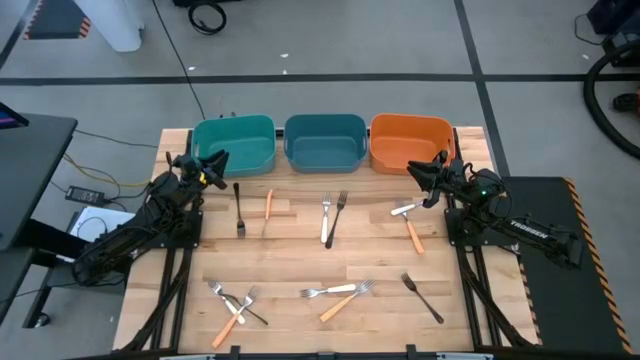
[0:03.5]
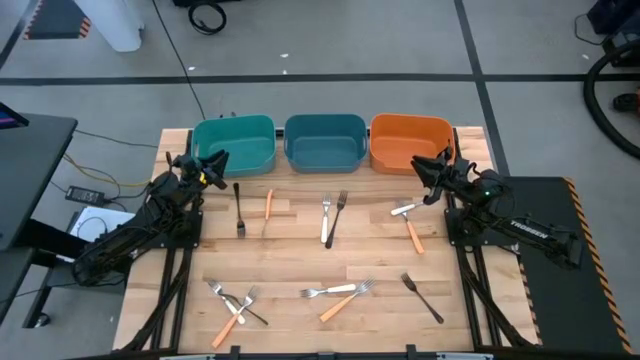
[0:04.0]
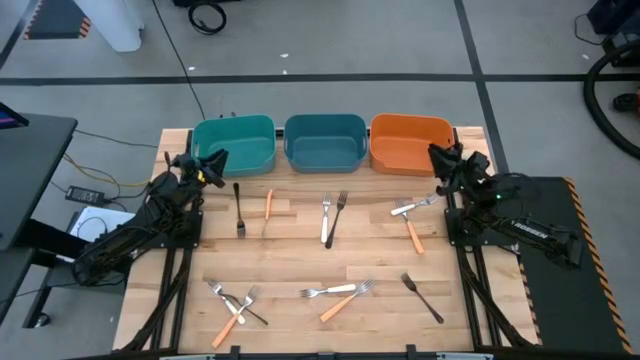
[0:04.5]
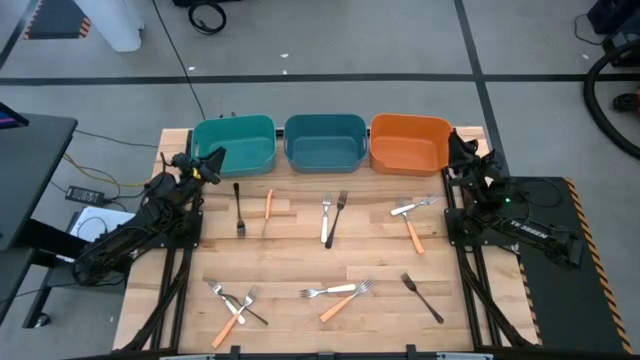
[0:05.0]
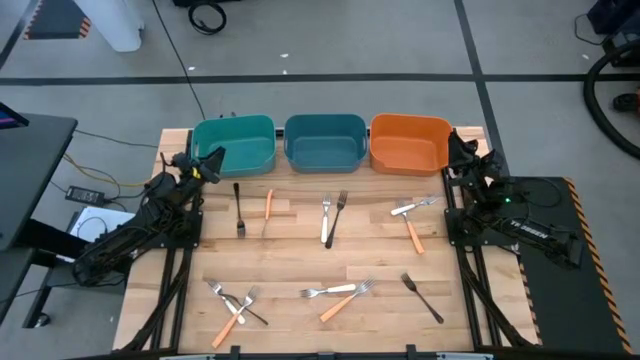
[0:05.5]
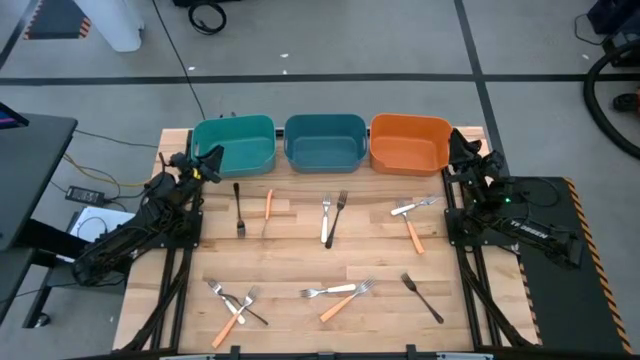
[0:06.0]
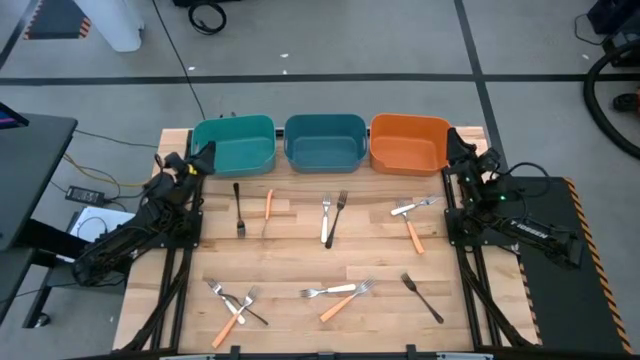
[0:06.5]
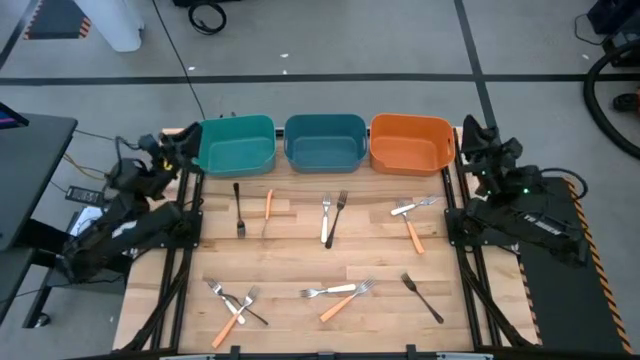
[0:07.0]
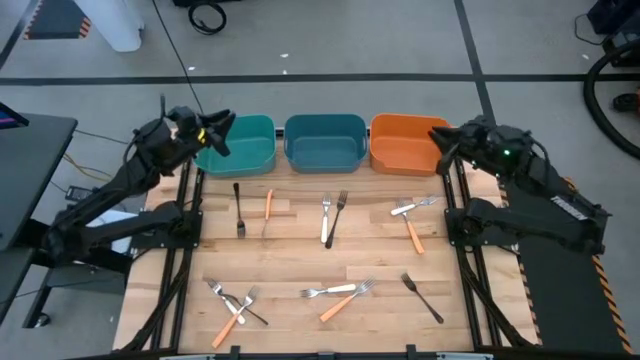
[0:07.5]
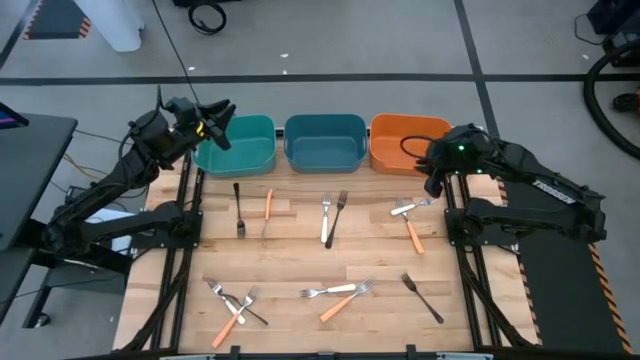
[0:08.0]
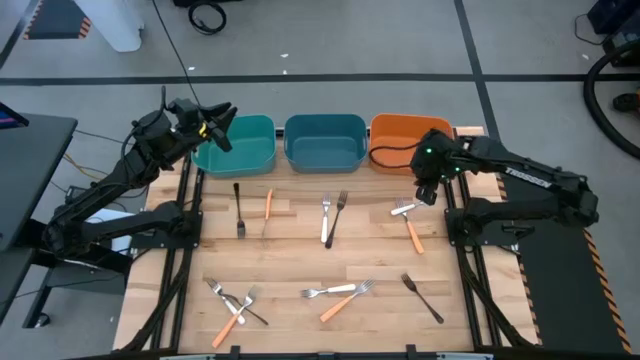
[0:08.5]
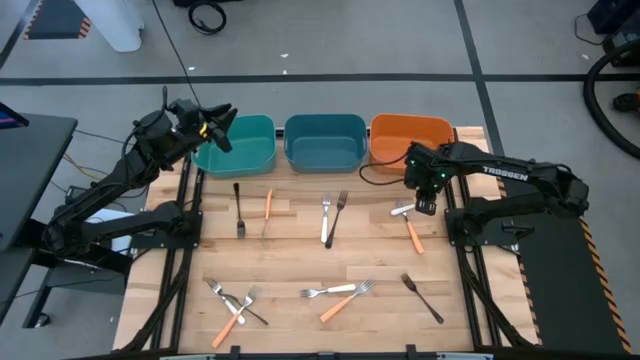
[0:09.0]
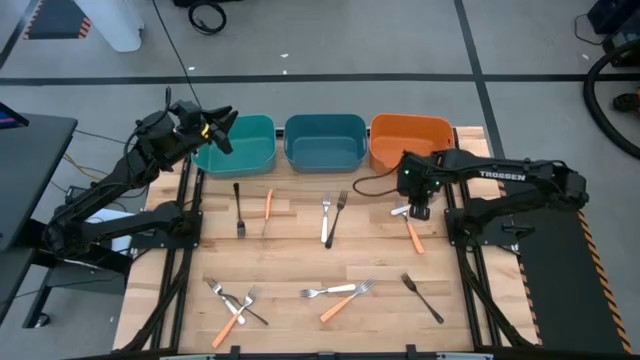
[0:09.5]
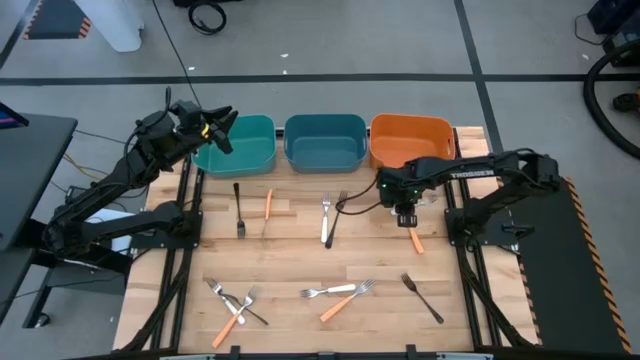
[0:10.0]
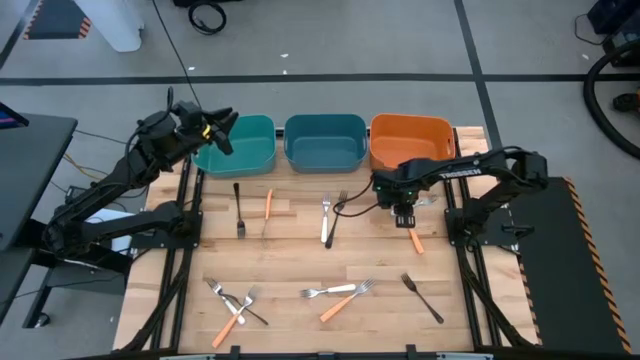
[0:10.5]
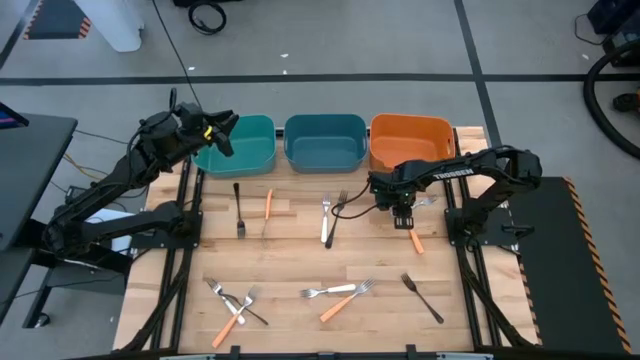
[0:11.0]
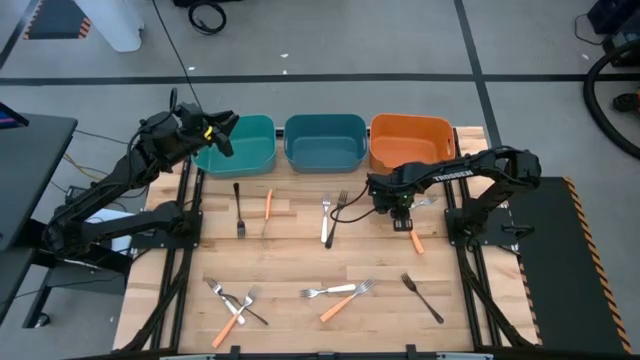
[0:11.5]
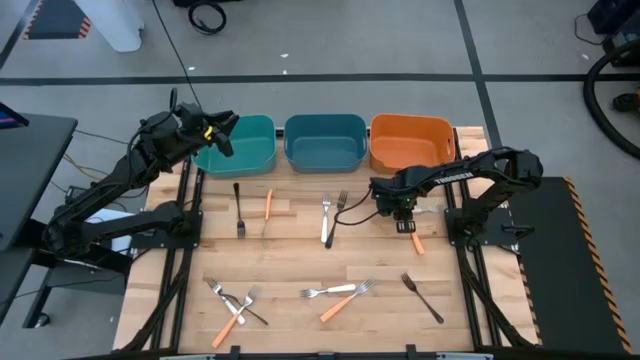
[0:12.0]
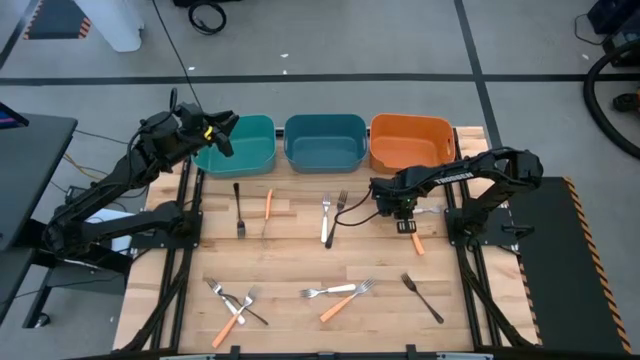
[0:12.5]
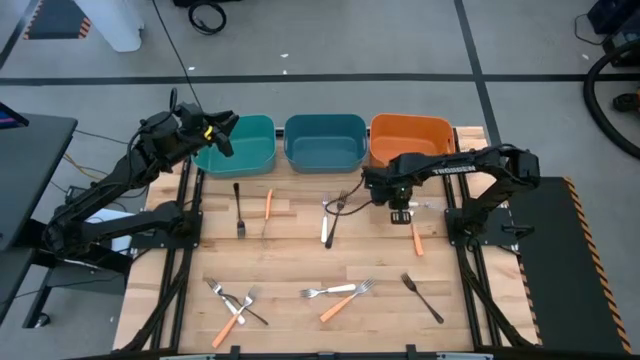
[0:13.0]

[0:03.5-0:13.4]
Task: Sort silverware by color (type)
Put the white fork into the dark blue bin

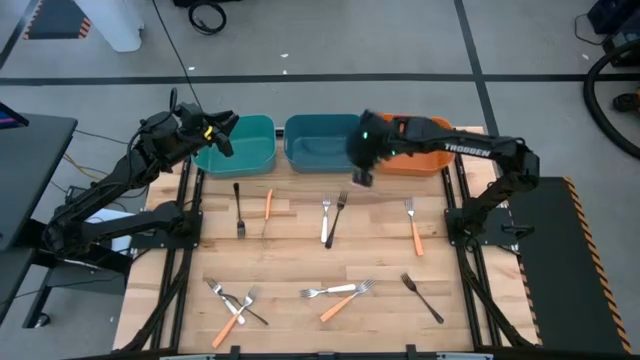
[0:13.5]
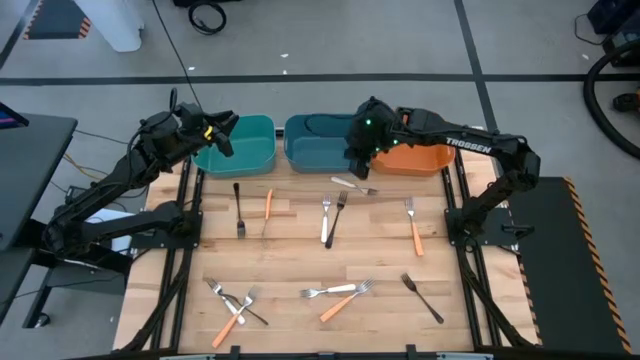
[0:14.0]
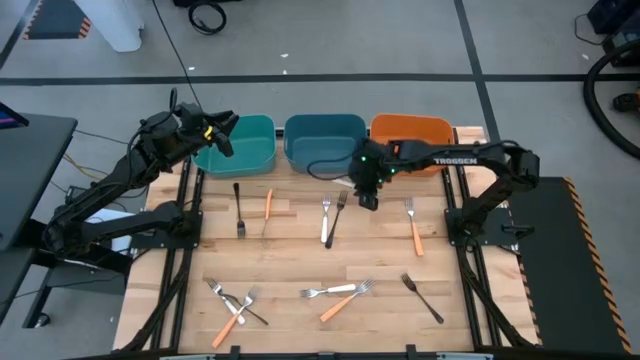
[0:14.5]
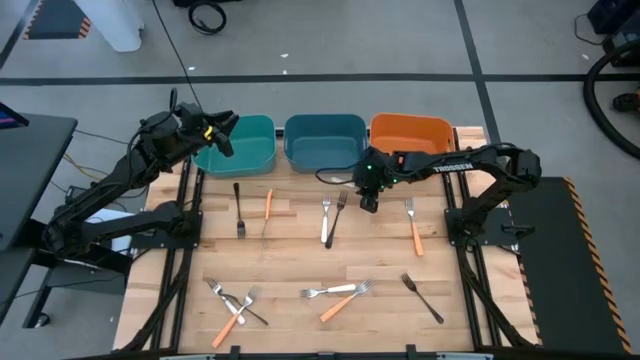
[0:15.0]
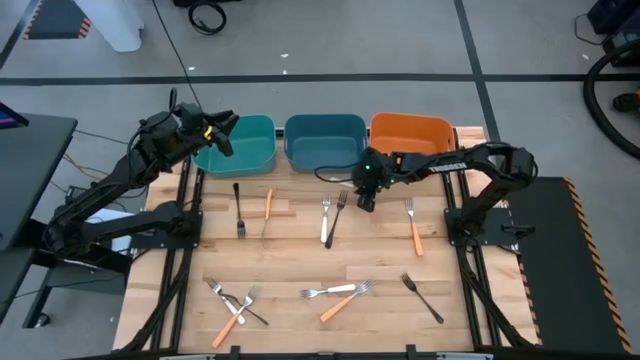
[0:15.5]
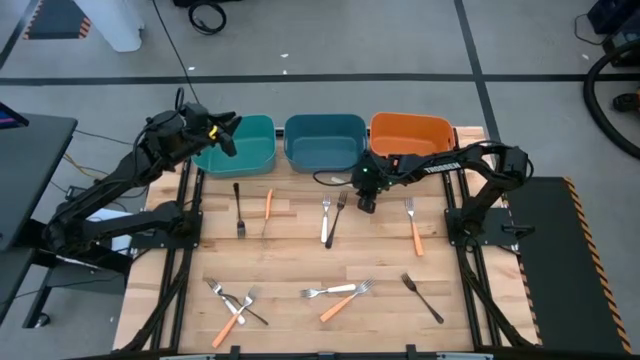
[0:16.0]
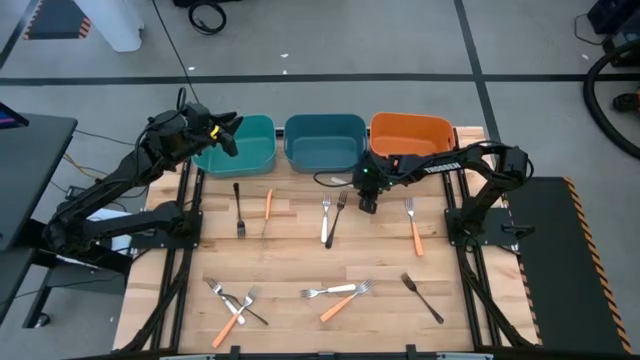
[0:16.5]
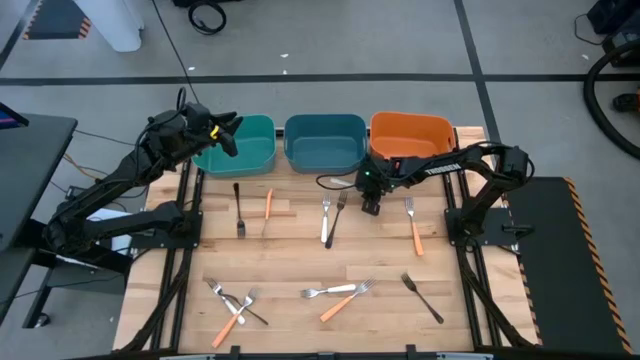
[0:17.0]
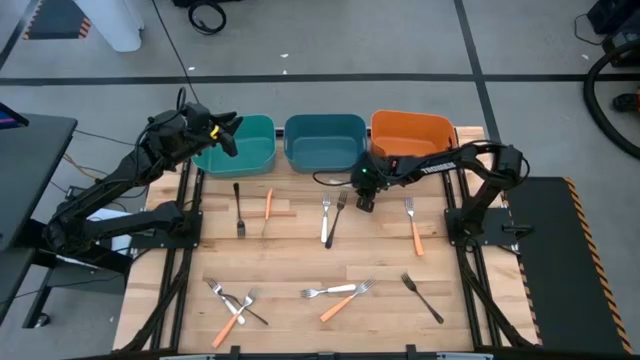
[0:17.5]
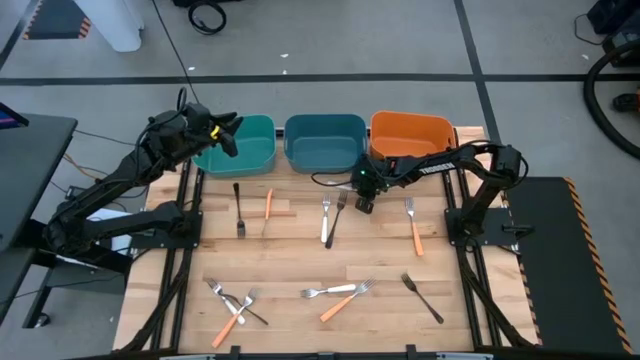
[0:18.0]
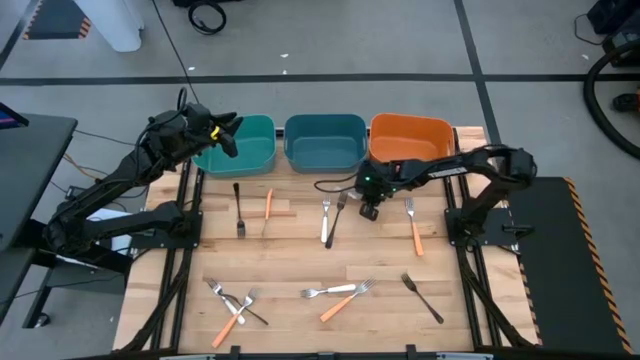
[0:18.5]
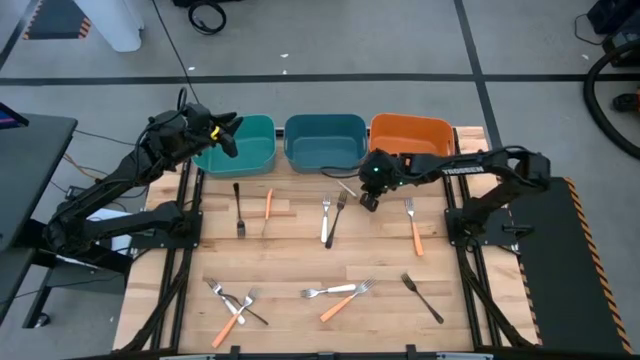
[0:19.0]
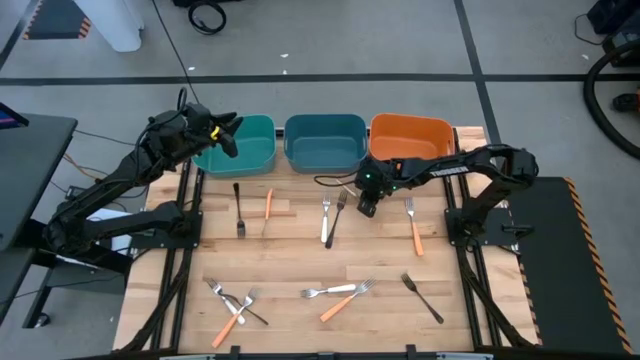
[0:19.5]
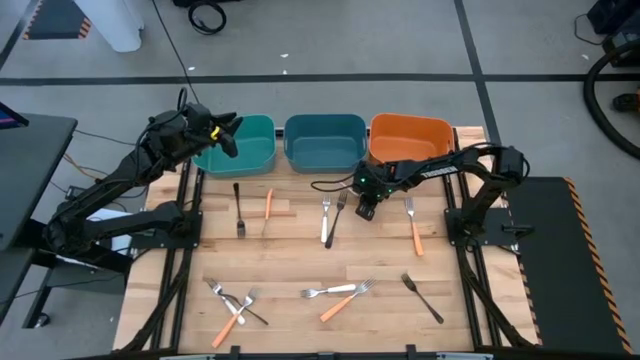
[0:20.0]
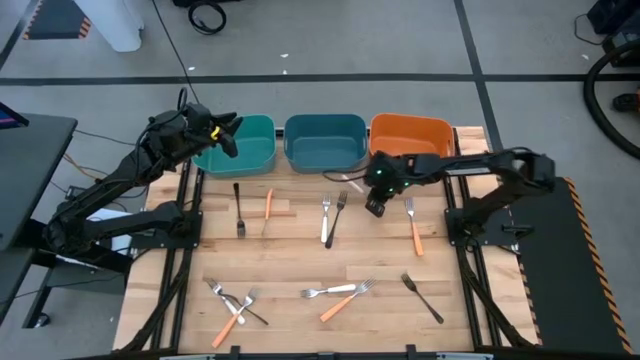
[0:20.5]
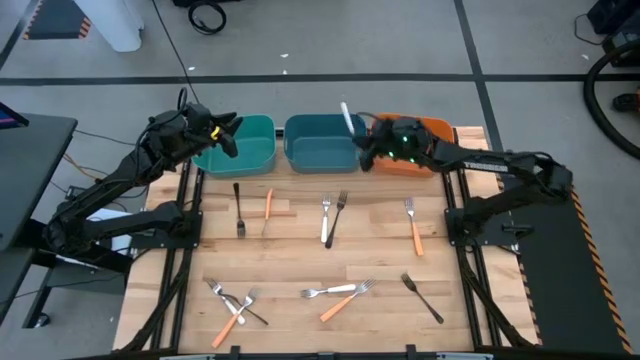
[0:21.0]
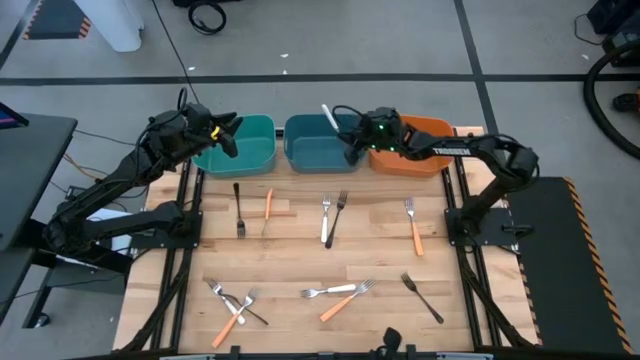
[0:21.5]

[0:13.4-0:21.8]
Put the white fork into the dark blue bin

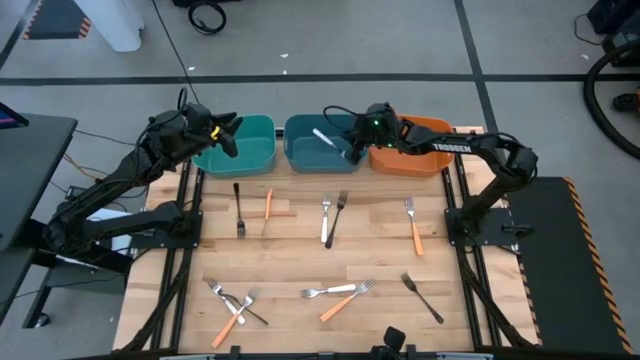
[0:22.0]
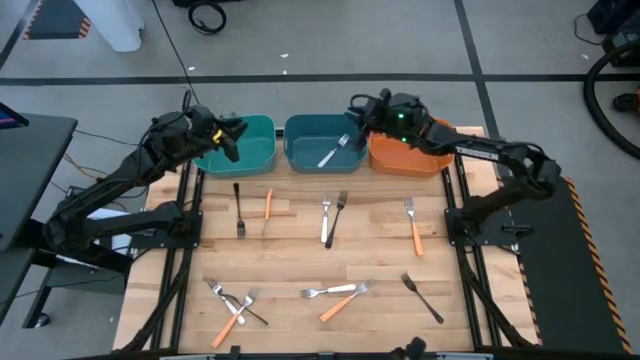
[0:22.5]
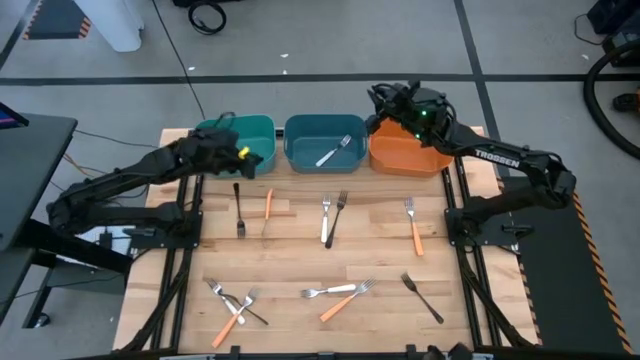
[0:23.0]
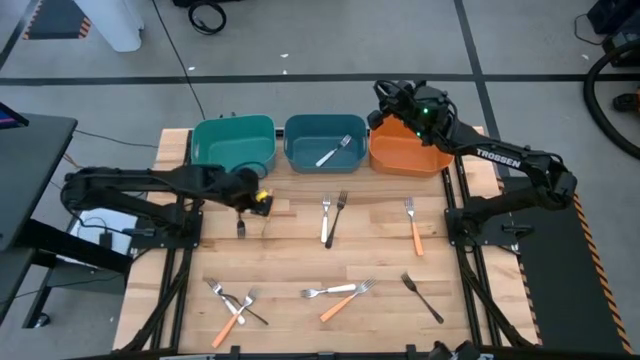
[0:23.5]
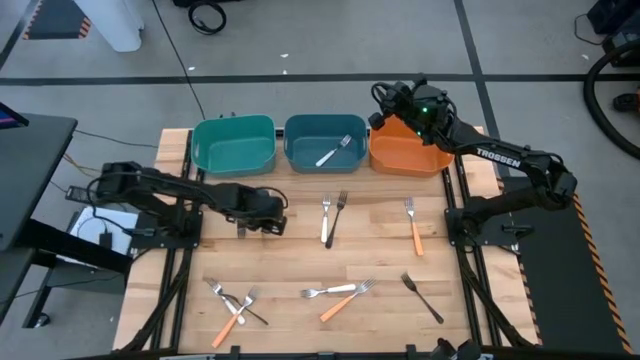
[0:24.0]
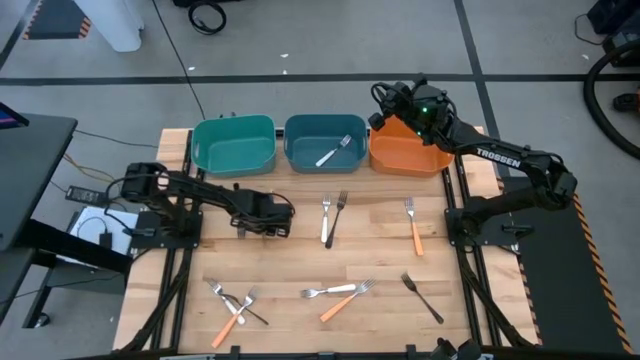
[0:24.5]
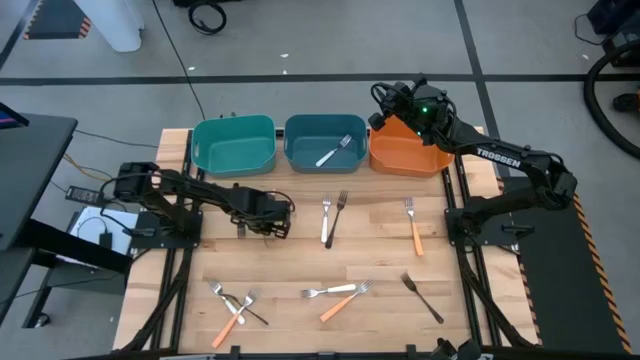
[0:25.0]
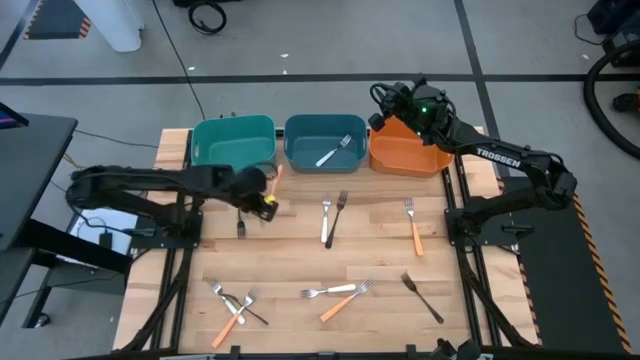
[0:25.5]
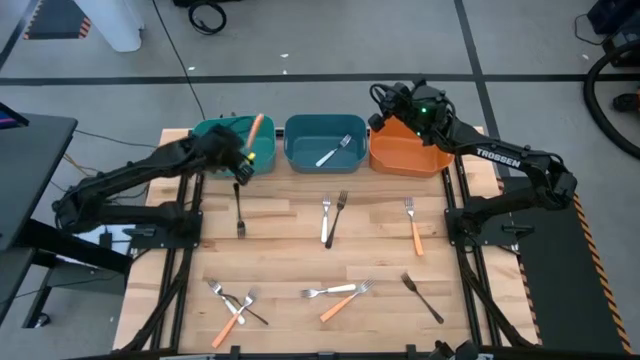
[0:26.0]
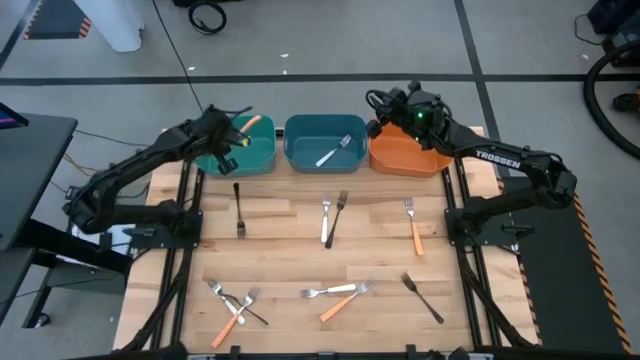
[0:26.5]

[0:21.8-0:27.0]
Put the orange fork into the green bin
